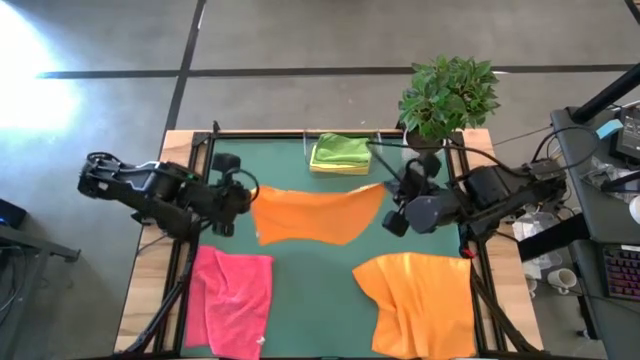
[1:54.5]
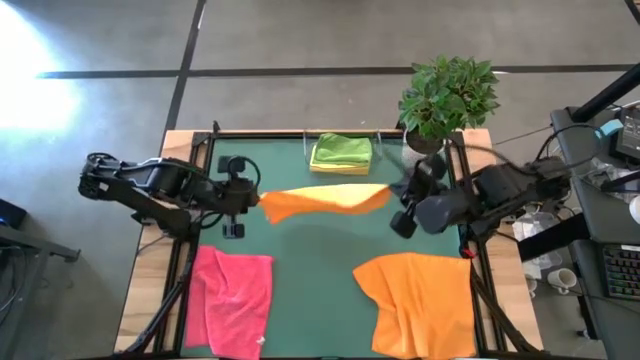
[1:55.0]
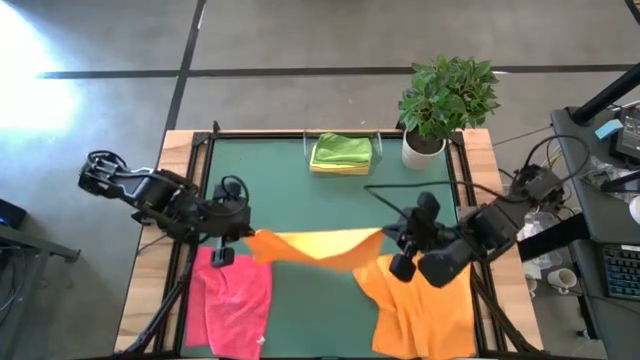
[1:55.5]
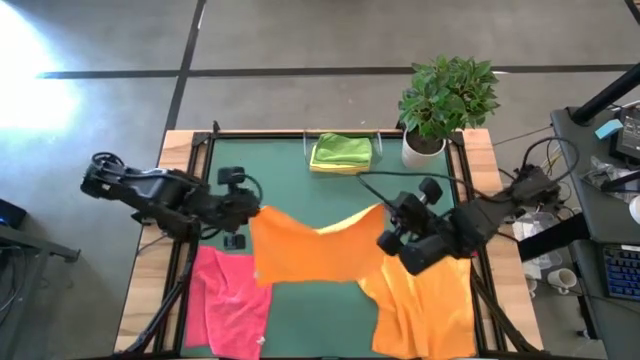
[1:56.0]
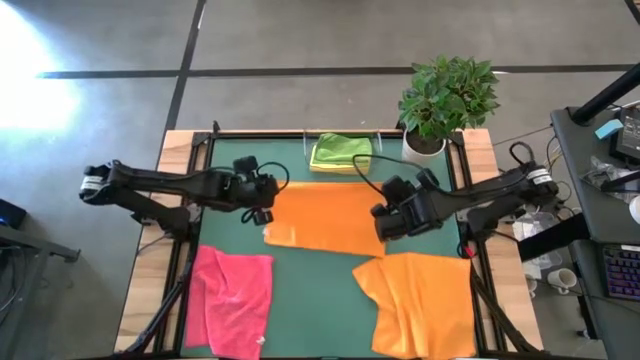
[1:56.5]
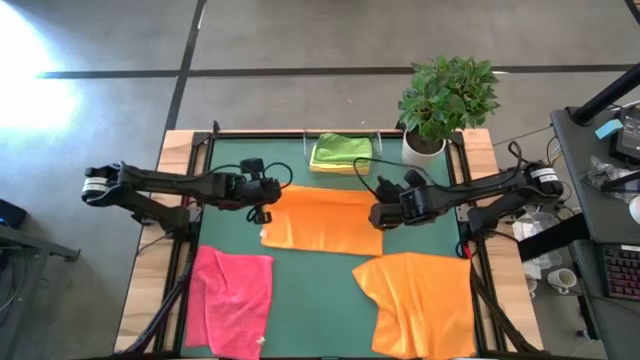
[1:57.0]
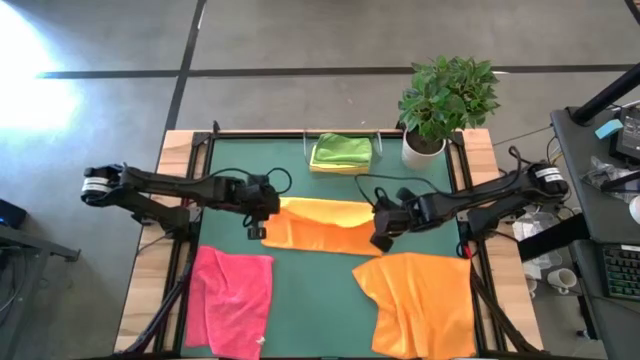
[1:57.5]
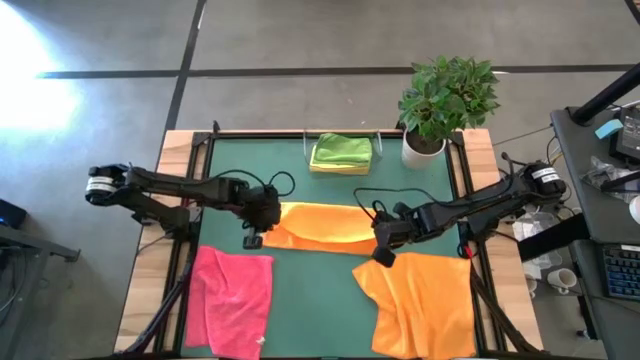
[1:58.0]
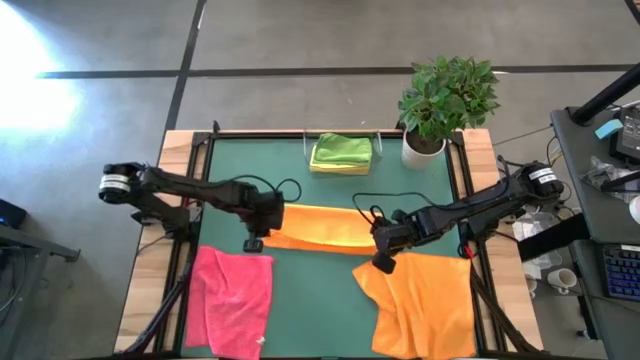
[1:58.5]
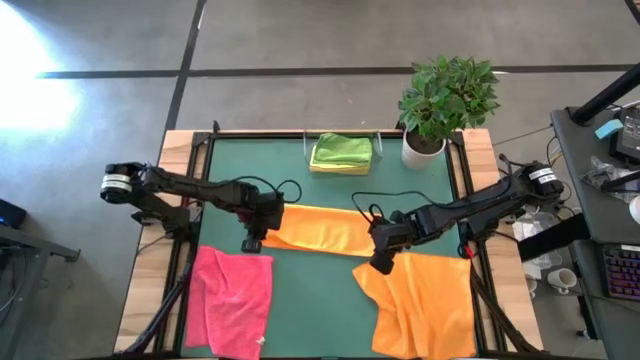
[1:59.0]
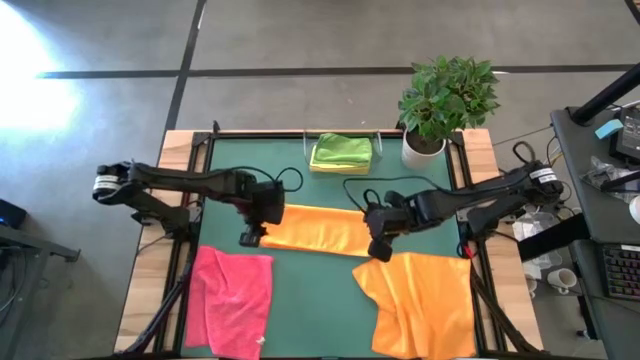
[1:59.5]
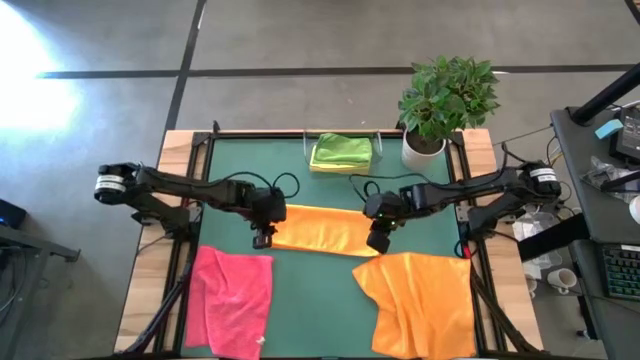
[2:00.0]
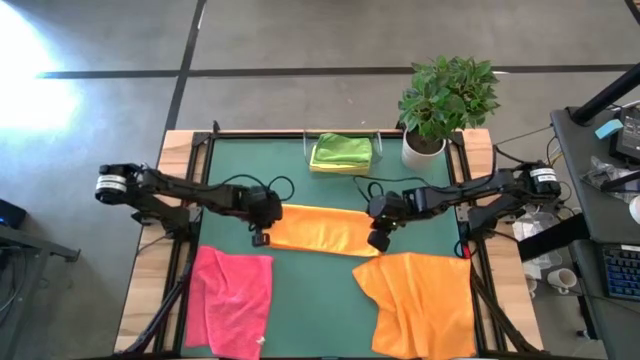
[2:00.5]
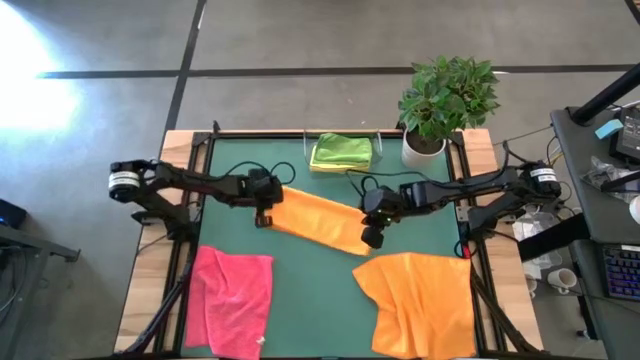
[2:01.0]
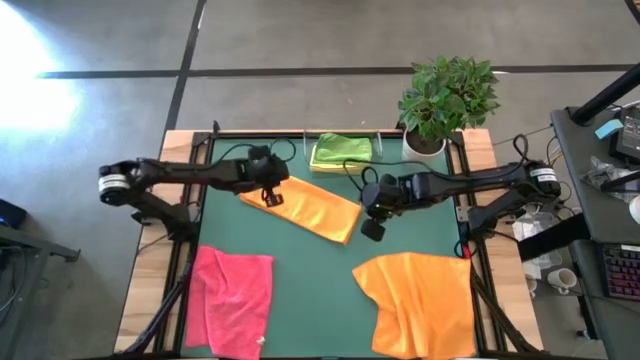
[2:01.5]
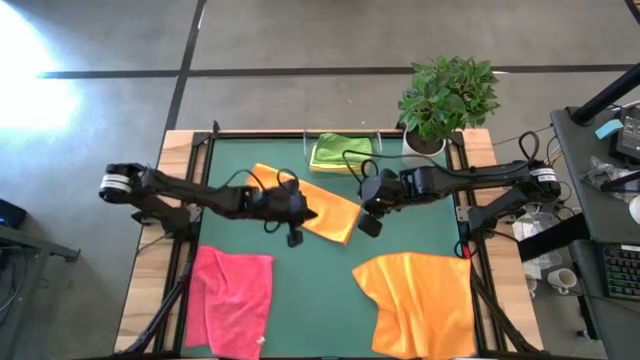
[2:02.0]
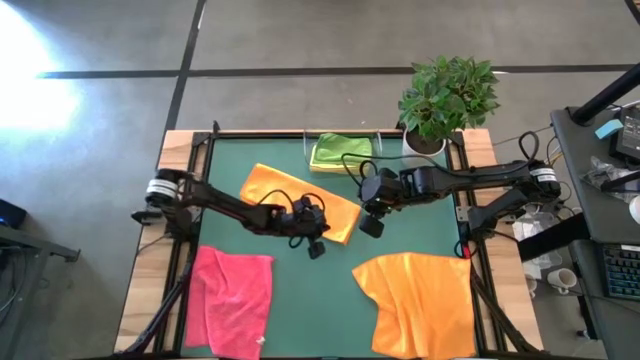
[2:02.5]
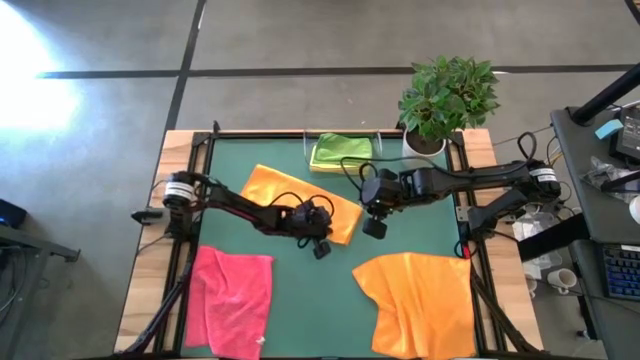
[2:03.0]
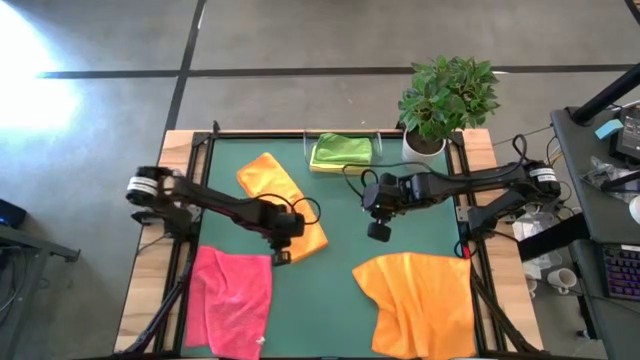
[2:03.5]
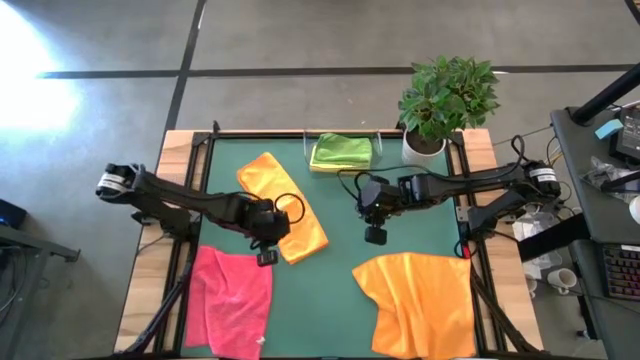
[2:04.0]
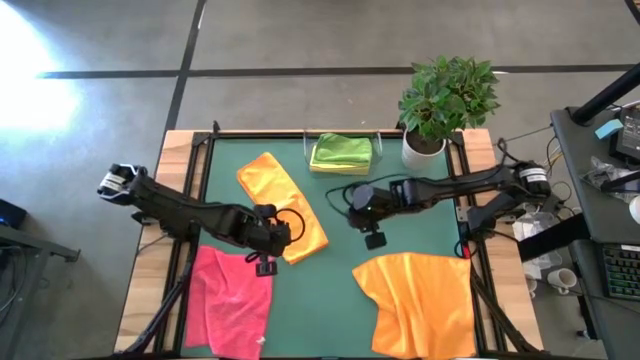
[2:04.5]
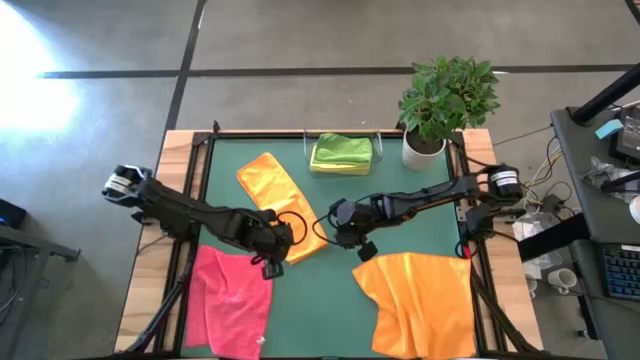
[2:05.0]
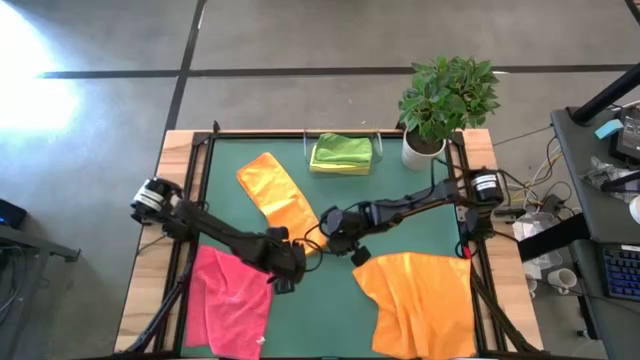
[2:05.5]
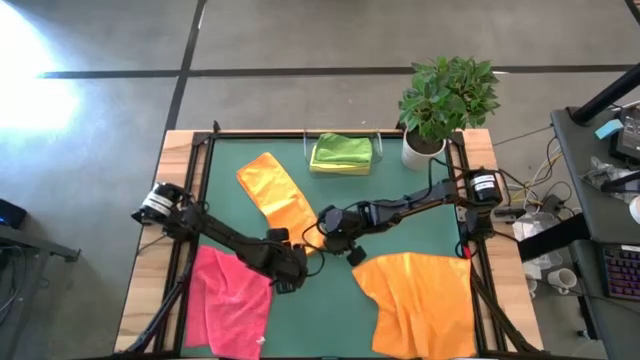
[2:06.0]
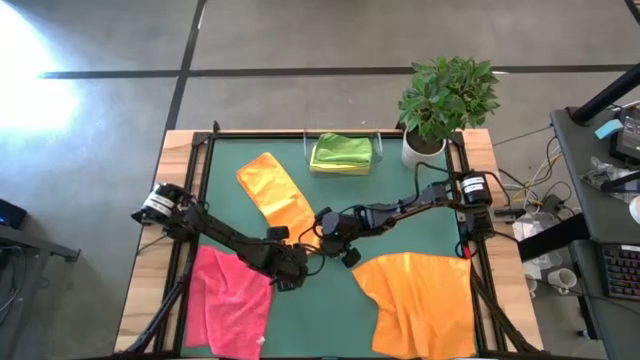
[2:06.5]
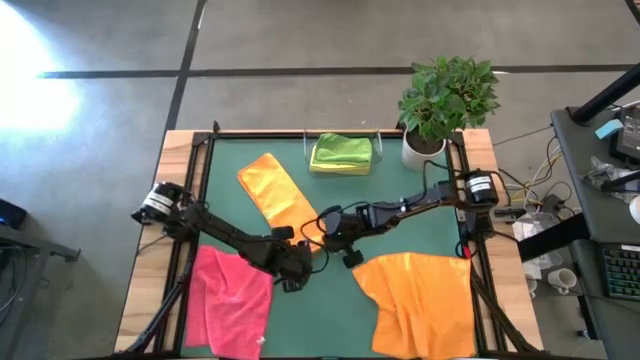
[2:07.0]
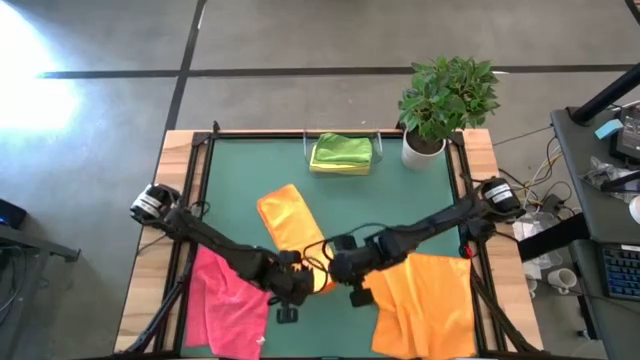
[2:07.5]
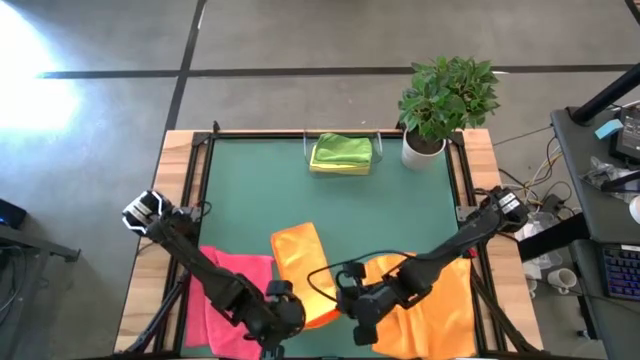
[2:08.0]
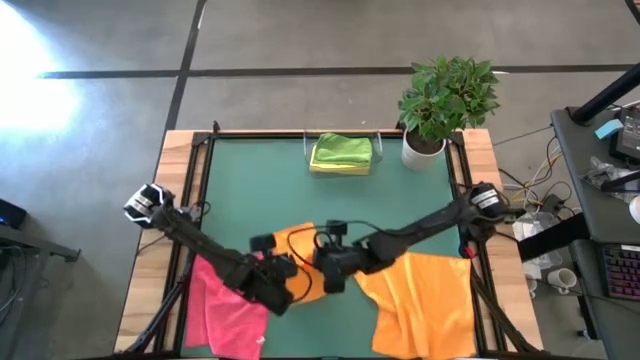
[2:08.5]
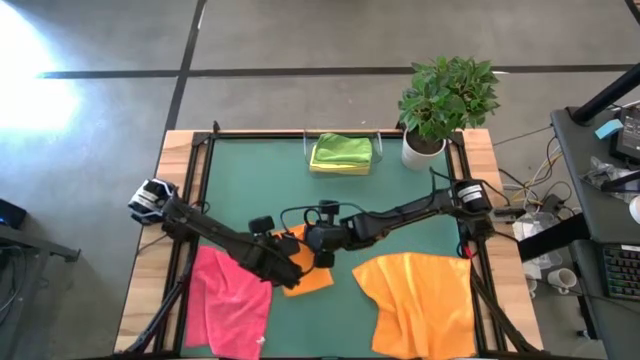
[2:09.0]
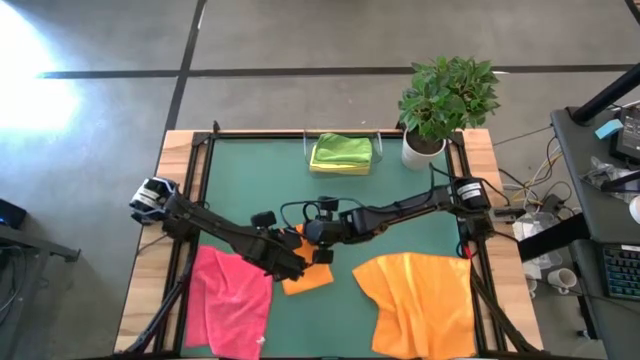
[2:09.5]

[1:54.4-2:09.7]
Task: Fold microfiber towels
Fold the orange towel

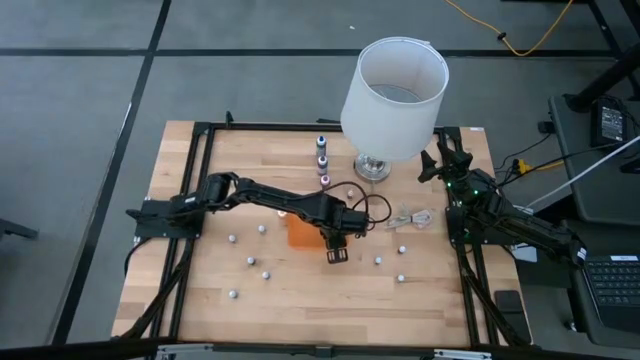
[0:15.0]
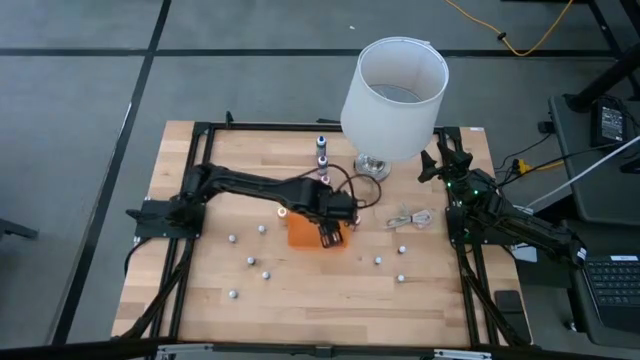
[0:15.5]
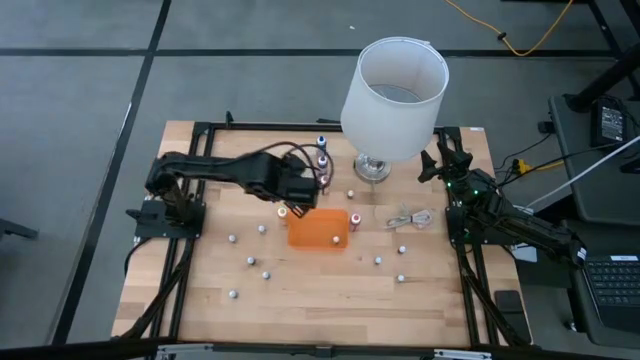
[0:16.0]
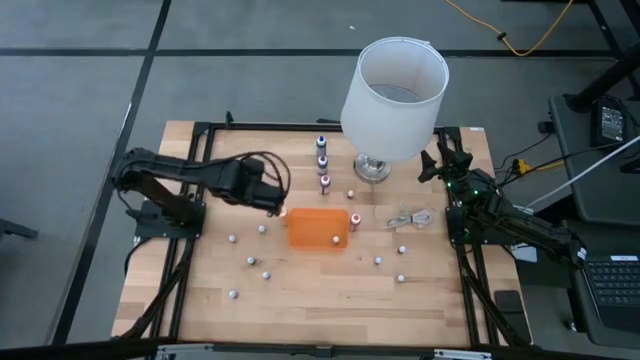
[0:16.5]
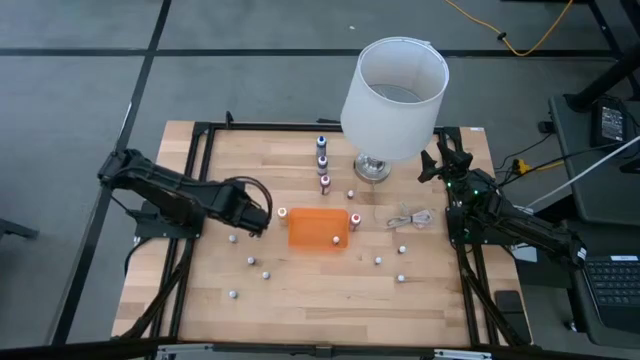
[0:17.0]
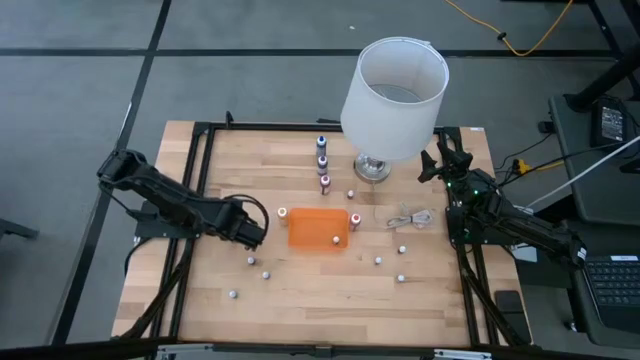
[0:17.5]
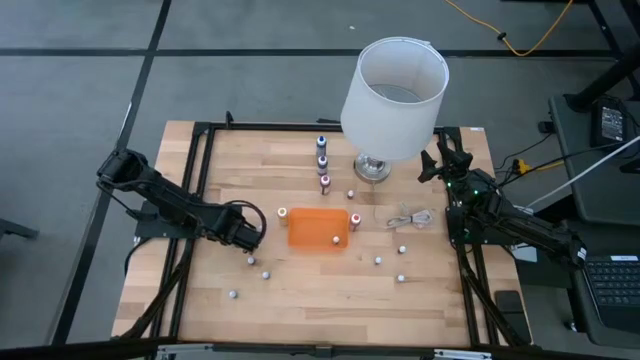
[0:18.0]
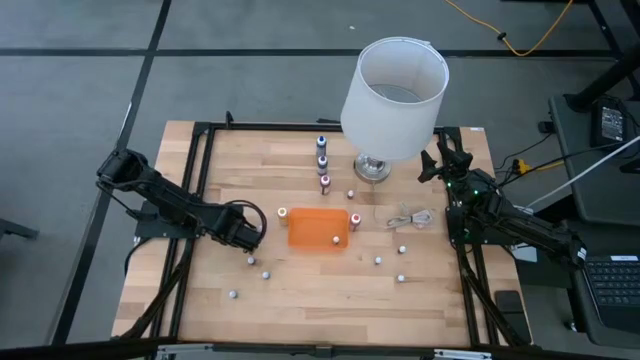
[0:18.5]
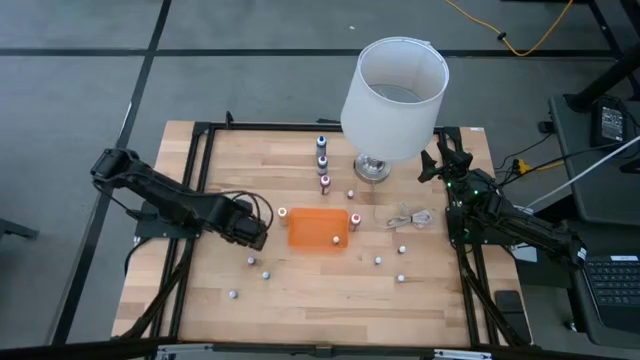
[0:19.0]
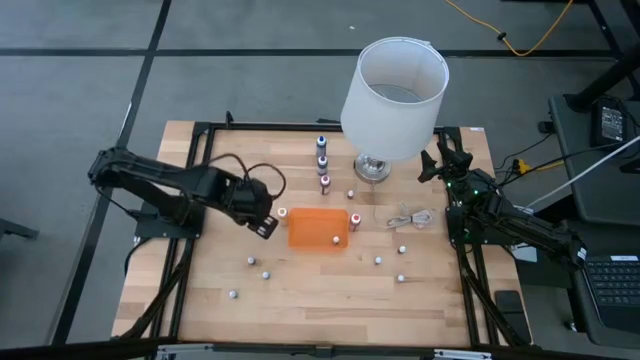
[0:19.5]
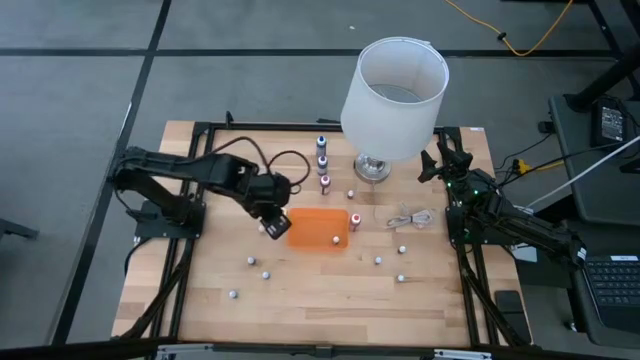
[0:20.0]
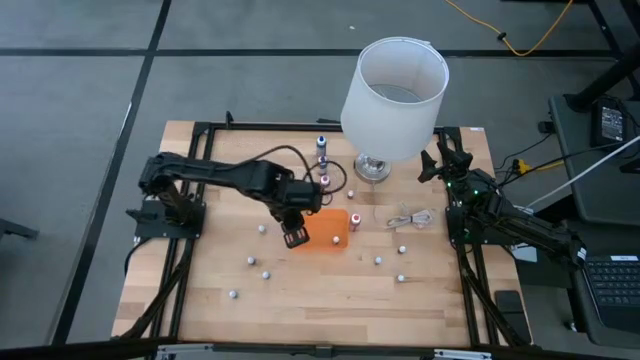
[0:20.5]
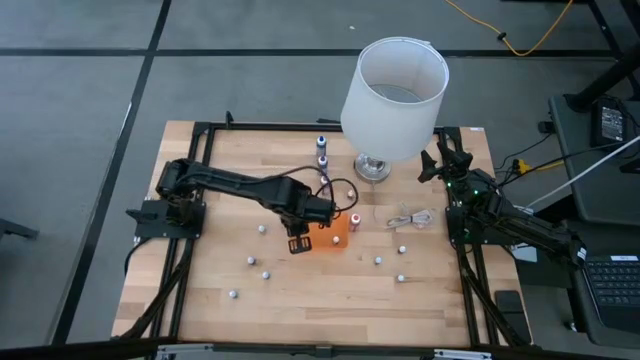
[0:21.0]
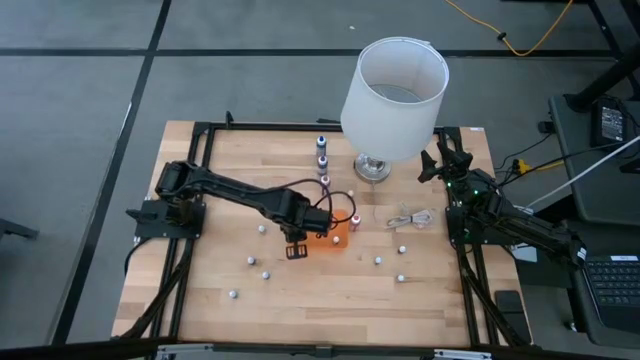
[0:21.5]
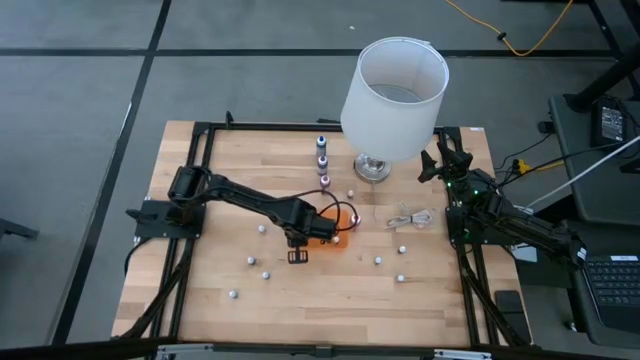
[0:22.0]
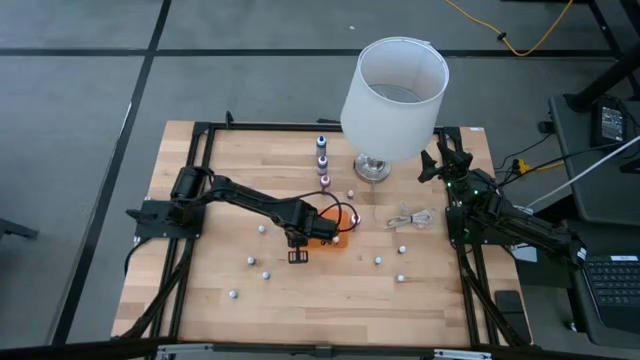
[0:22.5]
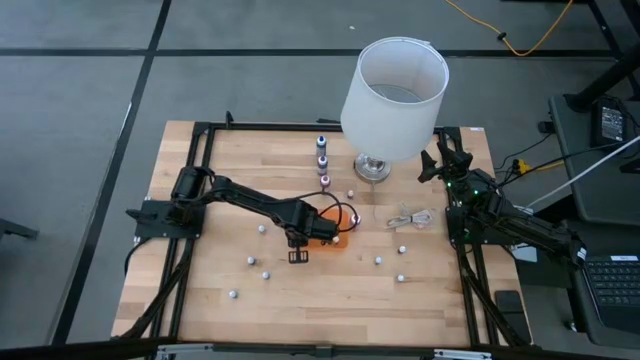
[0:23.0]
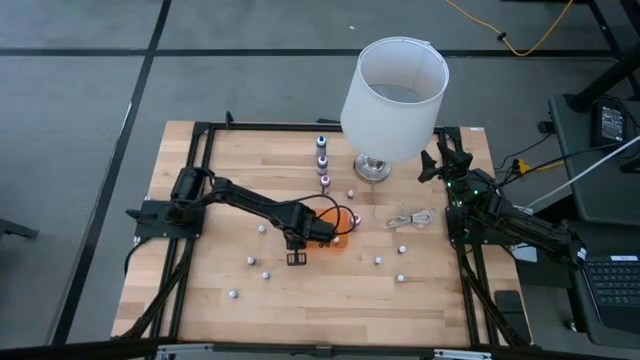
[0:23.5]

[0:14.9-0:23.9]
Task: Pick & Place food coloring
Put the left small red food coloring bottle into the orange bin
